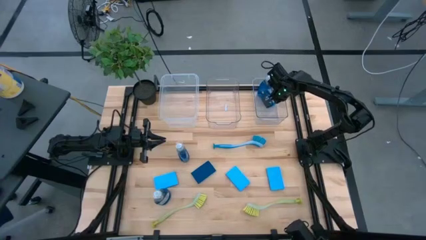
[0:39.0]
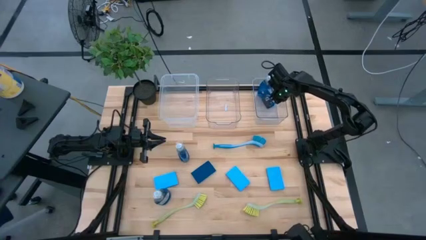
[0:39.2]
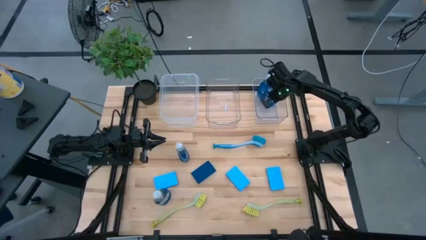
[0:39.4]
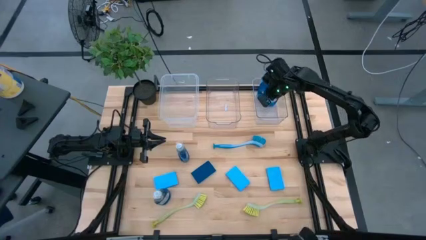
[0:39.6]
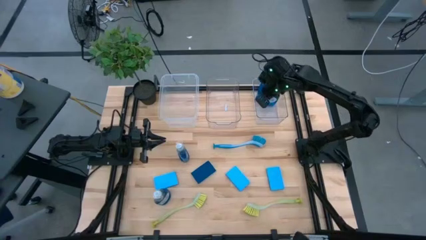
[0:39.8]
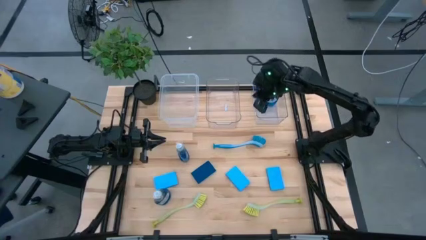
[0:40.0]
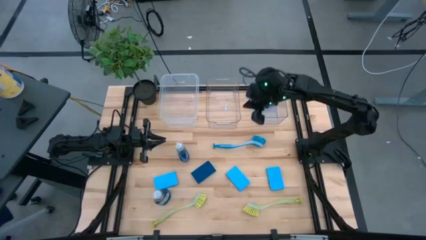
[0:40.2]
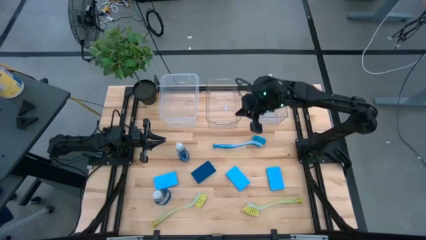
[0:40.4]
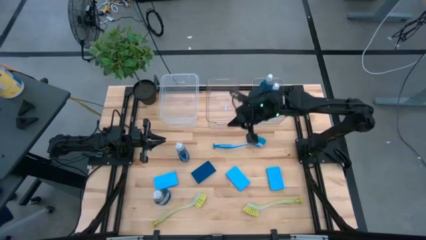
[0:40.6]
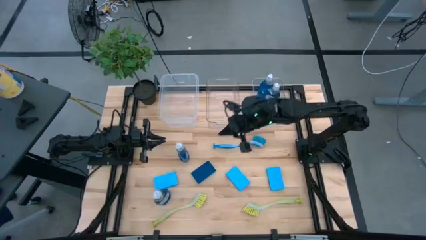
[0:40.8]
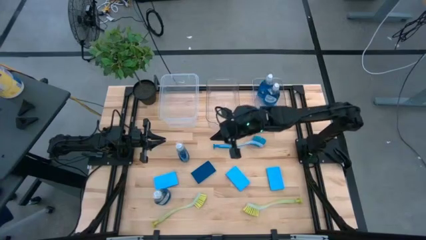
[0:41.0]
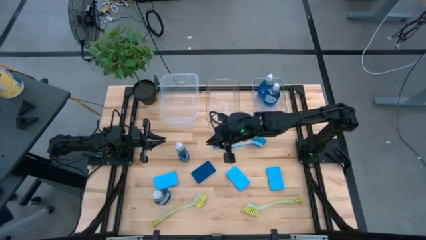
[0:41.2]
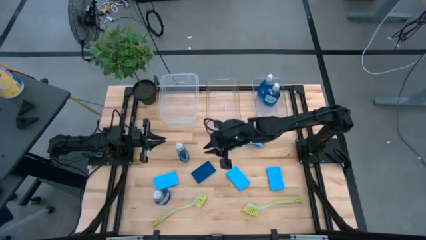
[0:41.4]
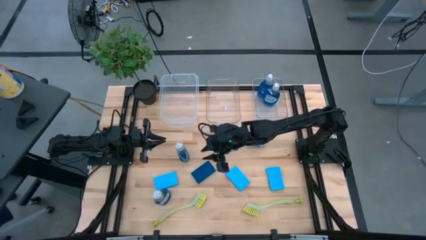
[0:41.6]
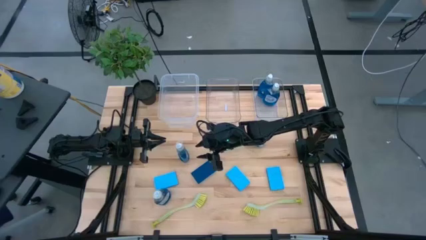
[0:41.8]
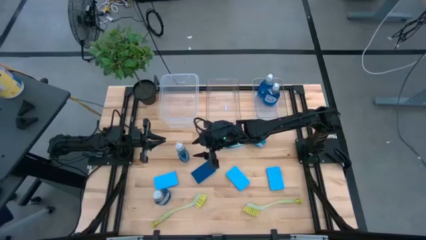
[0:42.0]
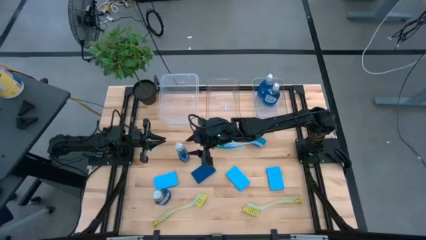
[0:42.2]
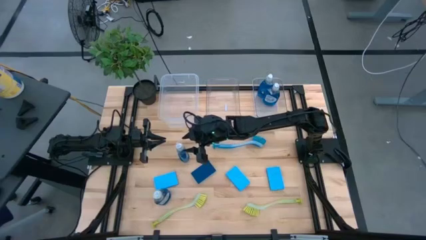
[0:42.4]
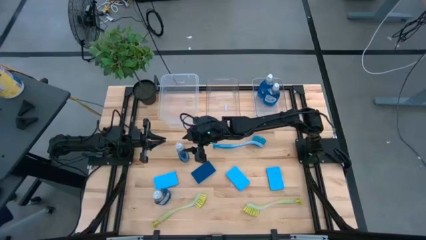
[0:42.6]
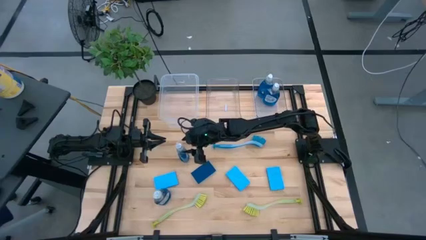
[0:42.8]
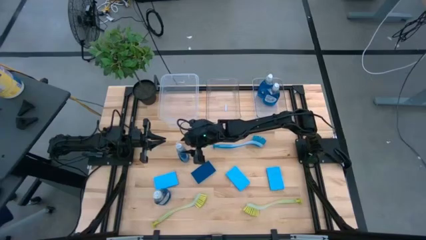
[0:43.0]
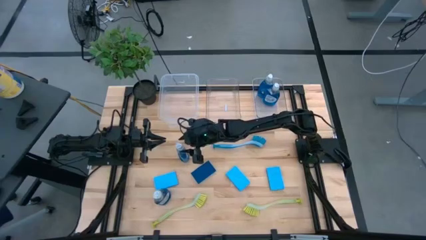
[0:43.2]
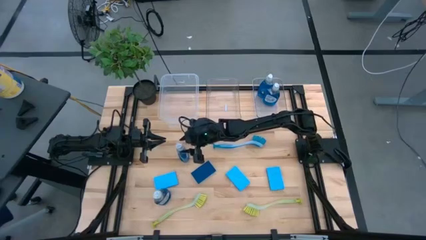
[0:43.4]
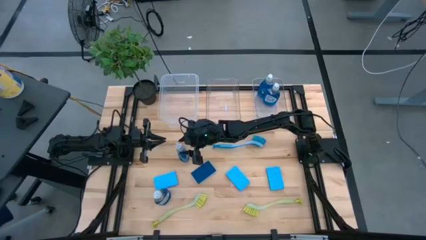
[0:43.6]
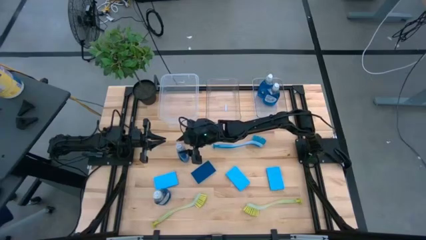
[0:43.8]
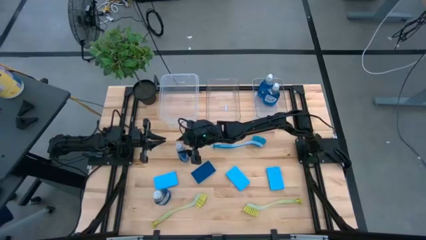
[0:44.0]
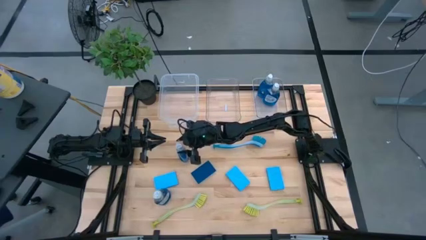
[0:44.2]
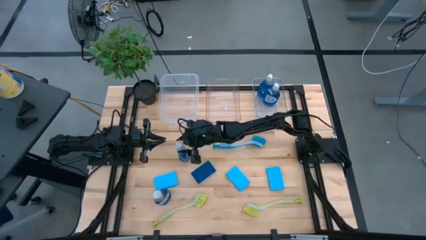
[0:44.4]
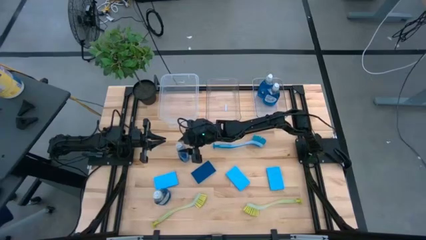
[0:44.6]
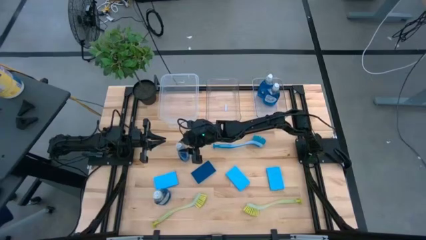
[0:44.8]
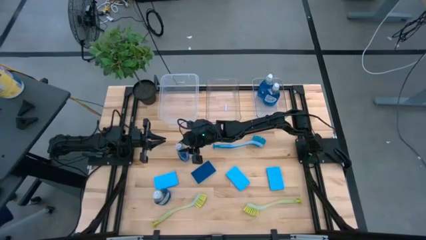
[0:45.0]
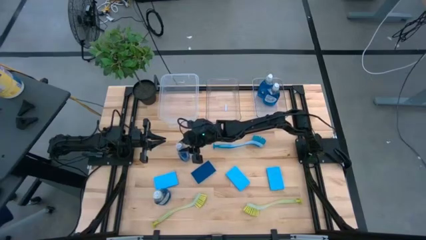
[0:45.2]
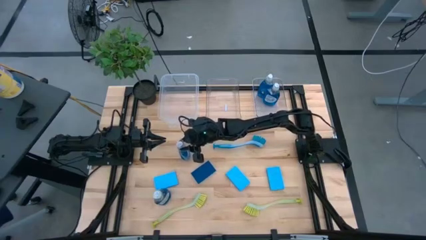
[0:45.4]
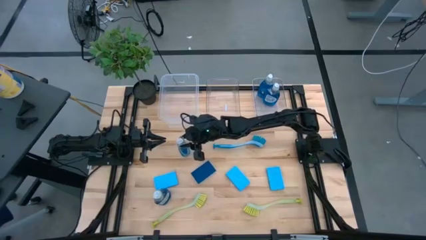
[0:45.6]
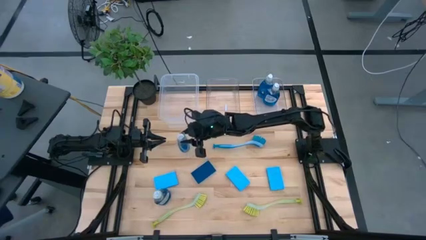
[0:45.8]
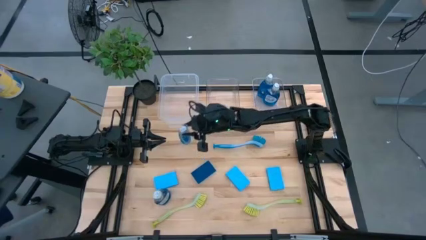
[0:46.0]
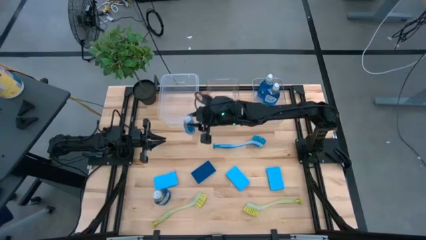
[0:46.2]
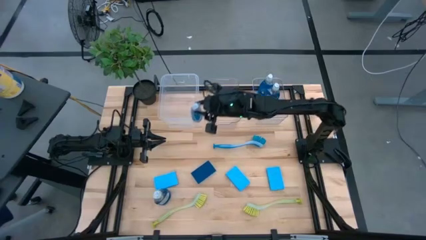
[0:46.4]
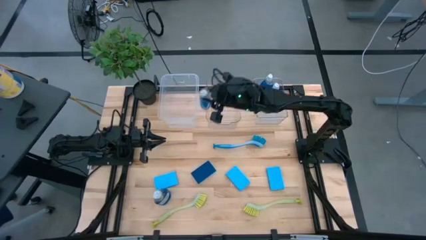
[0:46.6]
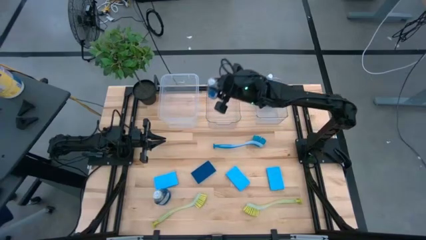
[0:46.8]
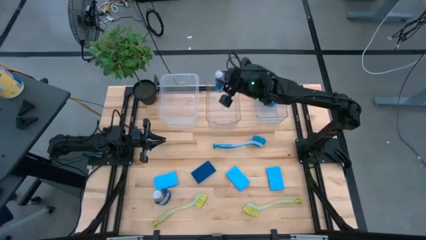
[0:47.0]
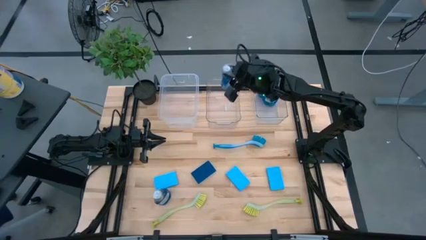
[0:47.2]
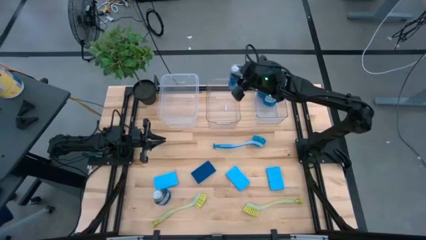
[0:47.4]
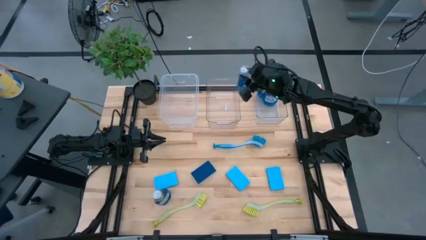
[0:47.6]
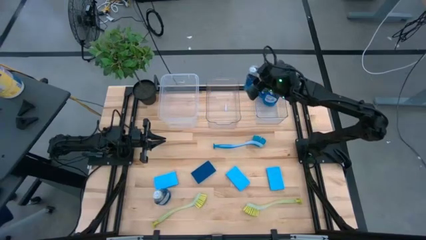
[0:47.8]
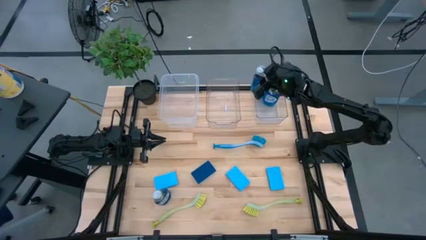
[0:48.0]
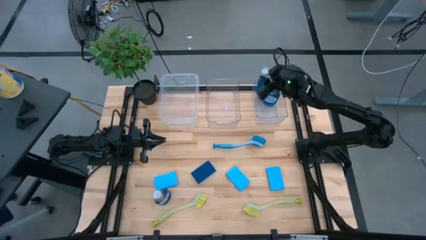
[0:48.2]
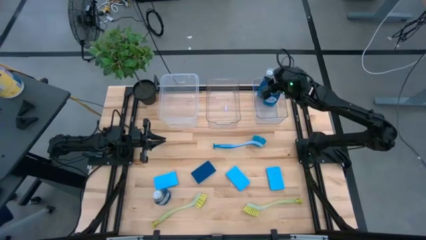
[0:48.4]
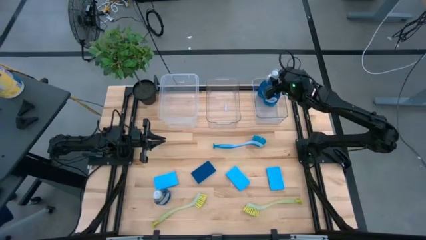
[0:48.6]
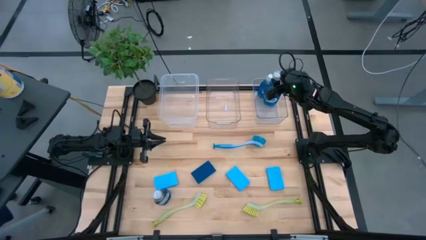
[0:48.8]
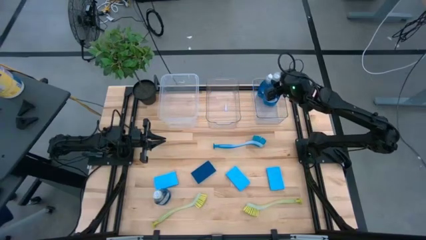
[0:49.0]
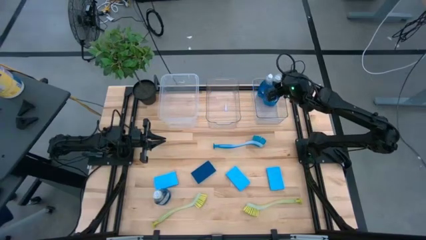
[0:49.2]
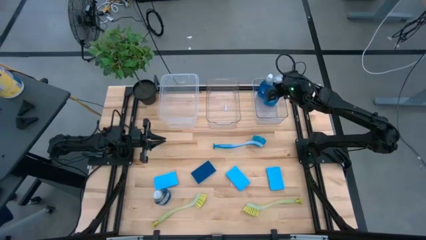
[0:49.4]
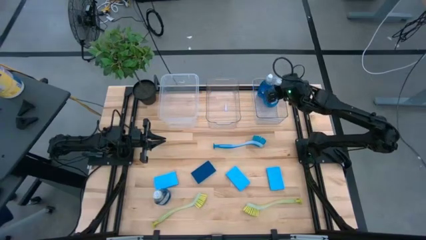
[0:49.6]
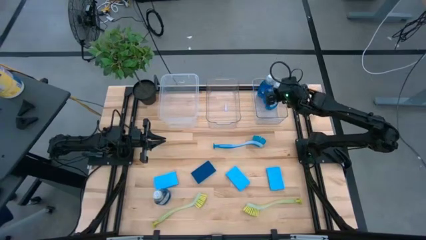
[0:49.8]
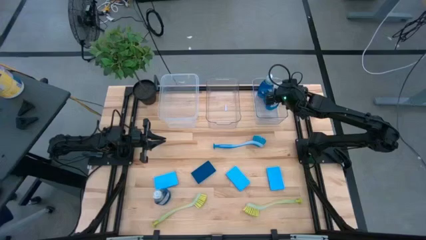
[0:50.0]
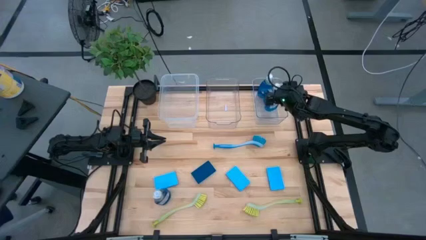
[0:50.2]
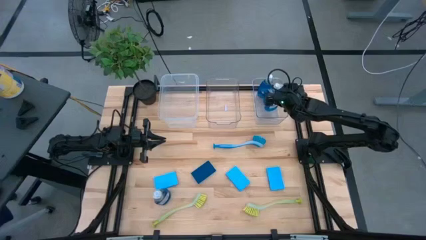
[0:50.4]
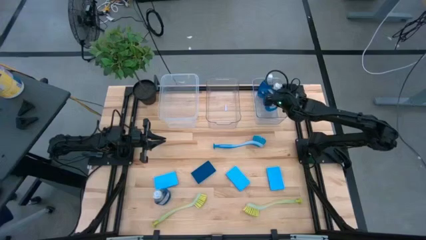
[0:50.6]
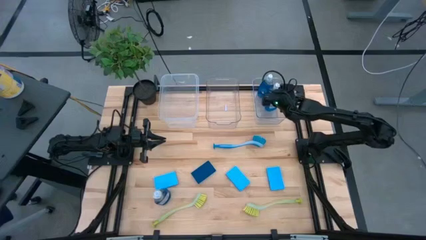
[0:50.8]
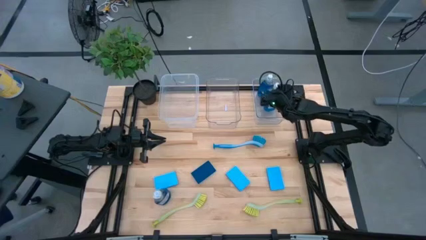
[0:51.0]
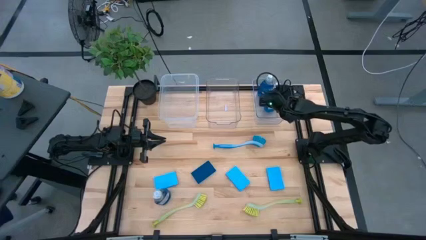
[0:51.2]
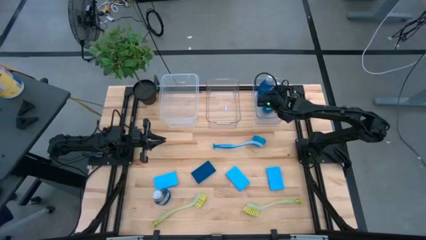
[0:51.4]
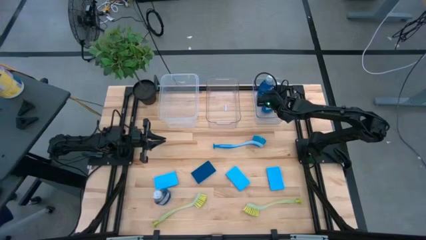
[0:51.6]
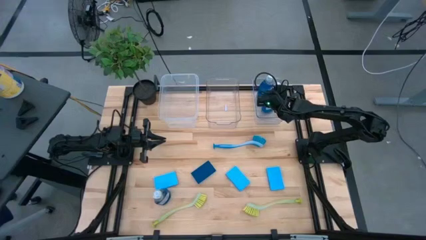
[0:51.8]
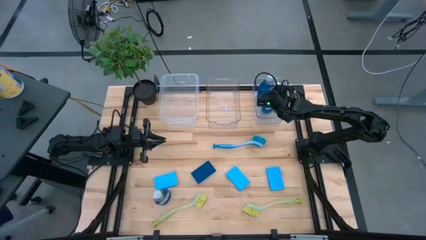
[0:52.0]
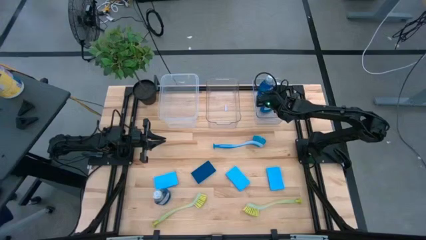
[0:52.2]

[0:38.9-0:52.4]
Task: Pick & Place Kitchen Sink Supplies
Put the blue detergent into the right transparent bin
